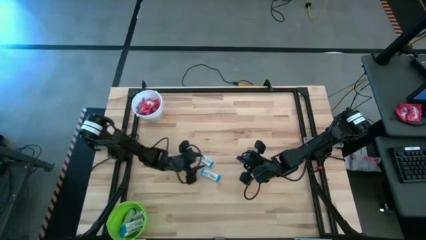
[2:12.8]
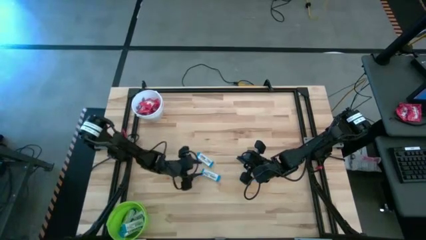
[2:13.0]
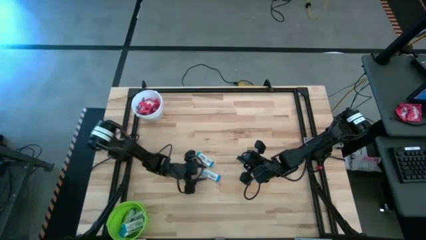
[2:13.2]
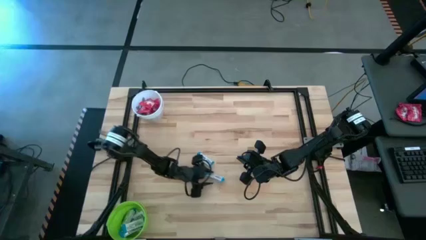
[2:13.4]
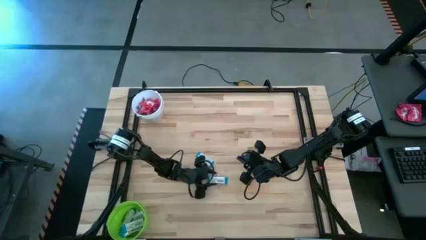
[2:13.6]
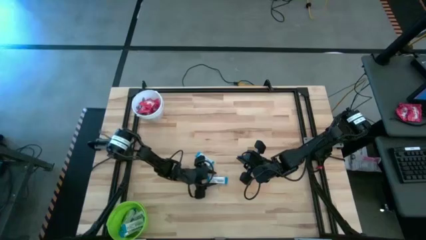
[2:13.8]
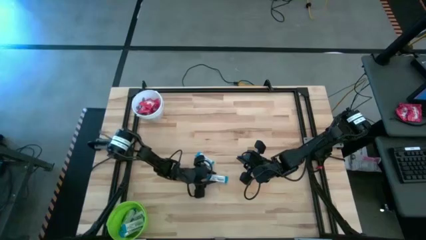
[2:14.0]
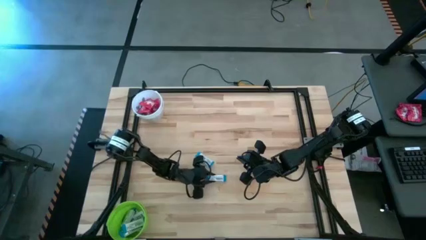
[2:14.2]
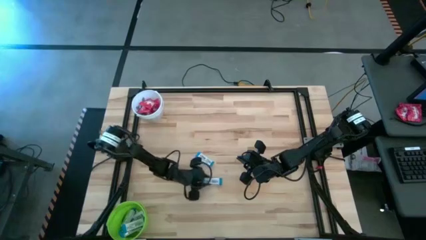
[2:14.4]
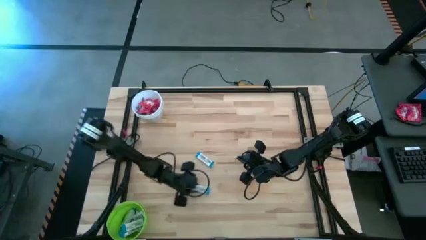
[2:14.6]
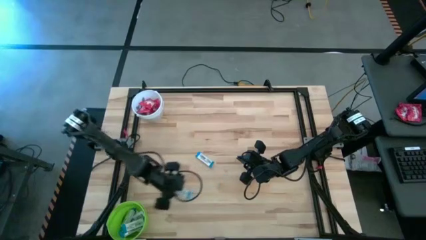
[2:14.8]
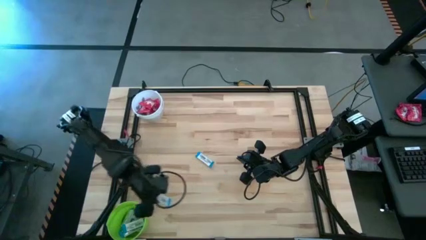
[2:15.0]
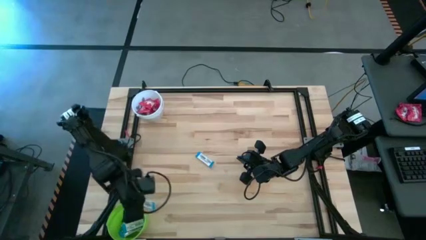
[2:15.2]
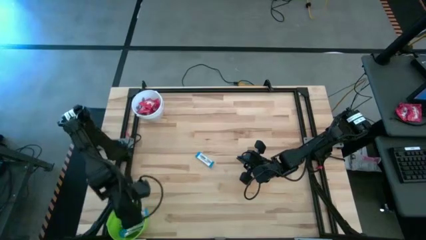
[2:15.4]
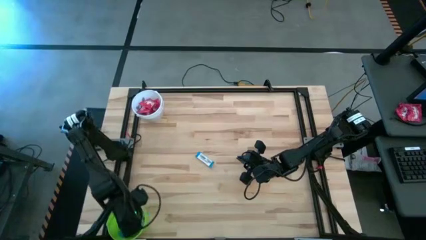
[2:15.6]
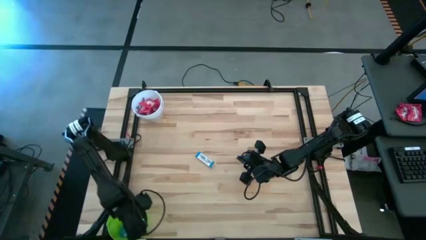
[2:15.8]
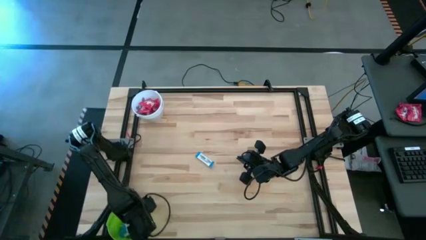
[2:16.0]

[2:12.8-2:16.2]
Task: Sort candy by brand, put in halloween buckets
Put the bottom blue chocolate bar into the green bucket

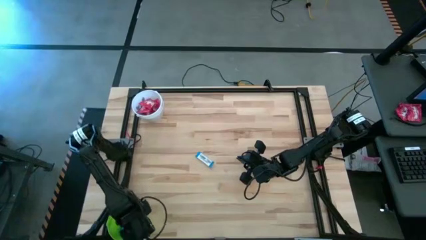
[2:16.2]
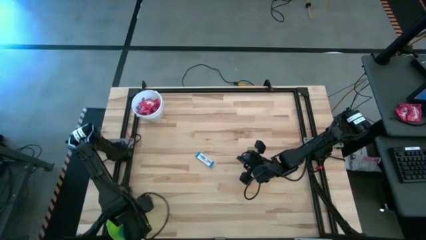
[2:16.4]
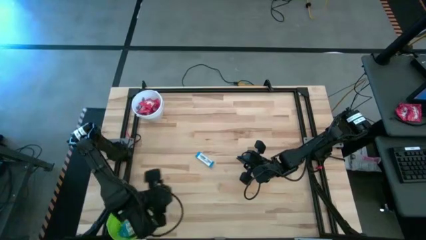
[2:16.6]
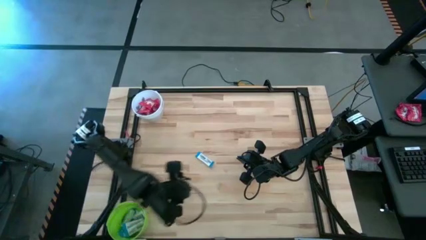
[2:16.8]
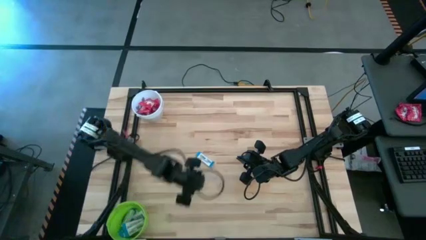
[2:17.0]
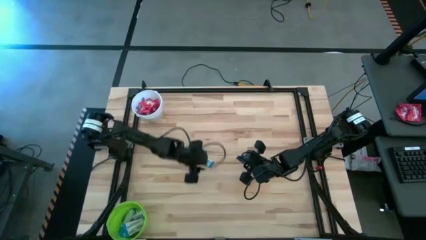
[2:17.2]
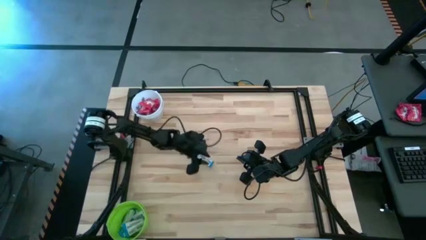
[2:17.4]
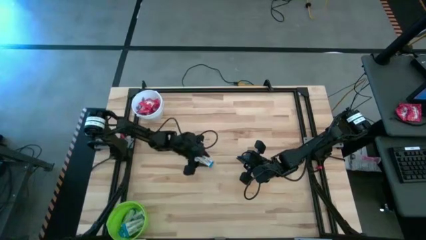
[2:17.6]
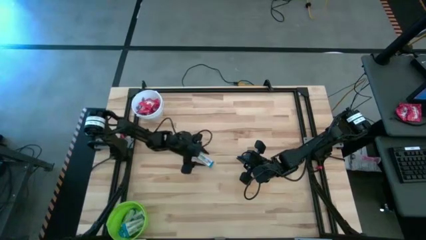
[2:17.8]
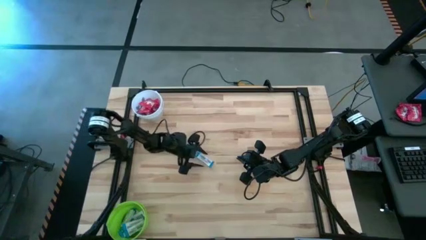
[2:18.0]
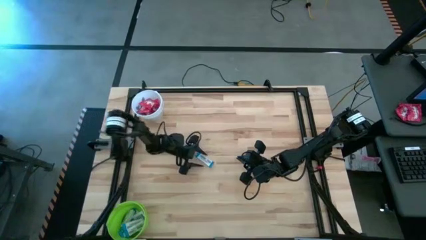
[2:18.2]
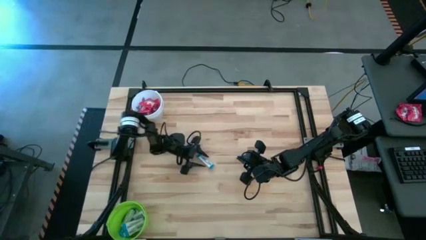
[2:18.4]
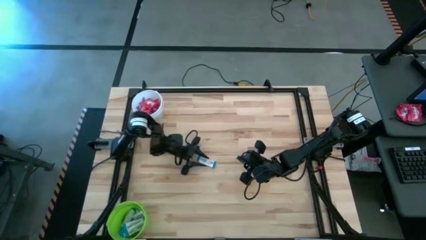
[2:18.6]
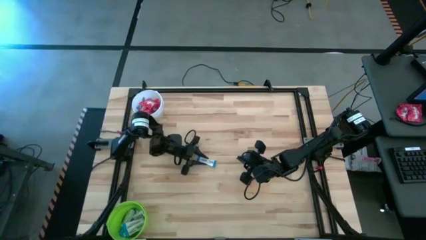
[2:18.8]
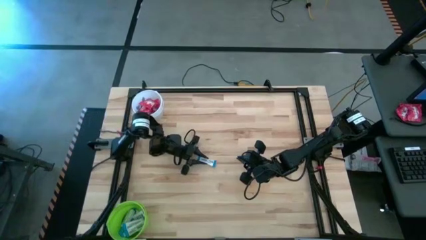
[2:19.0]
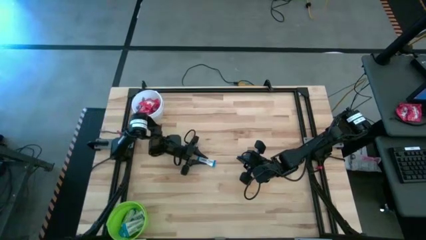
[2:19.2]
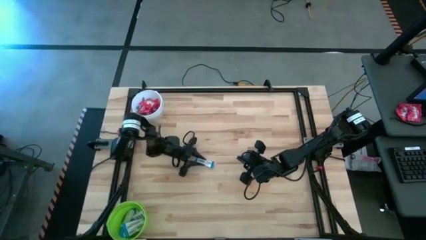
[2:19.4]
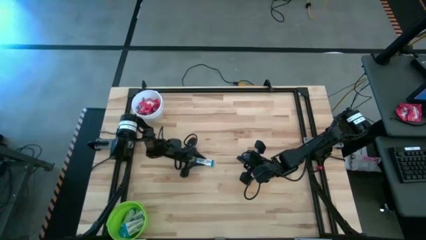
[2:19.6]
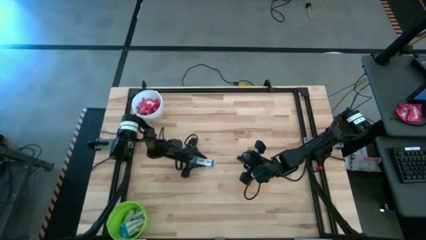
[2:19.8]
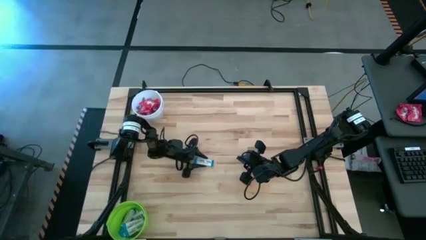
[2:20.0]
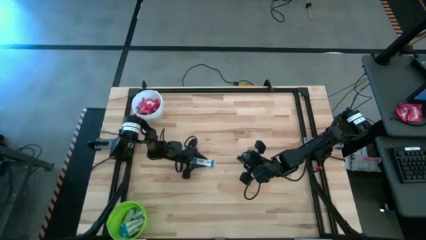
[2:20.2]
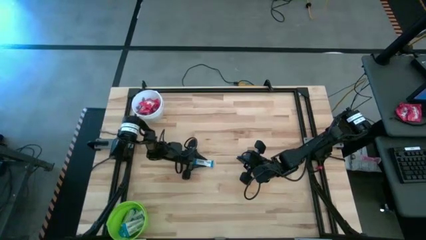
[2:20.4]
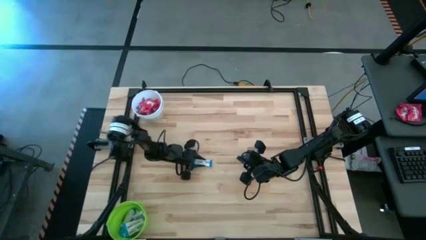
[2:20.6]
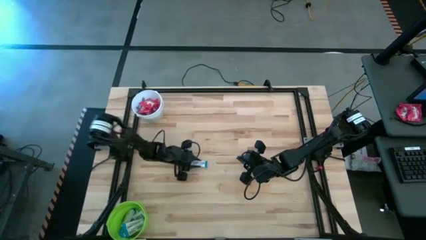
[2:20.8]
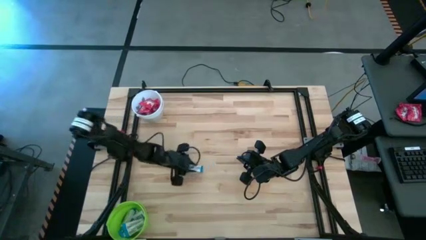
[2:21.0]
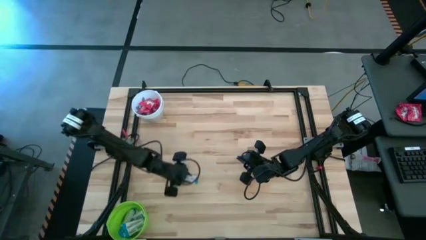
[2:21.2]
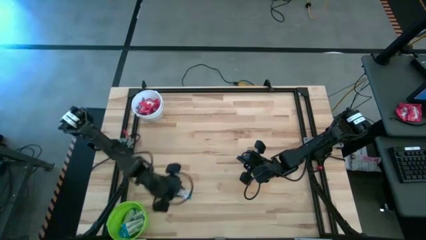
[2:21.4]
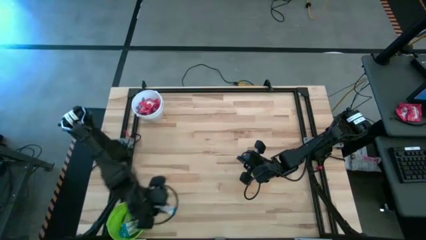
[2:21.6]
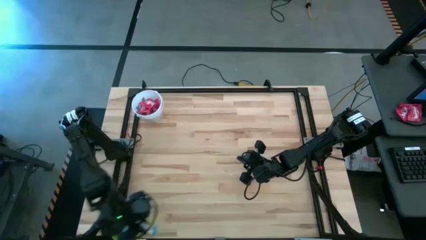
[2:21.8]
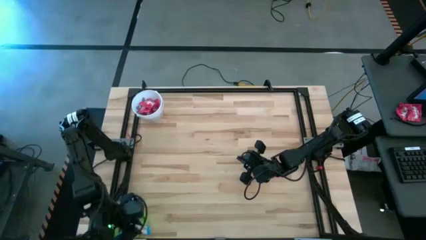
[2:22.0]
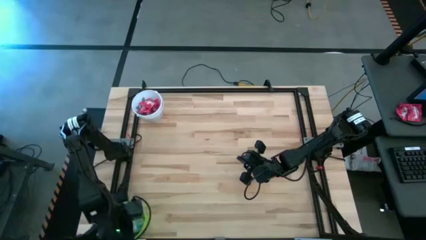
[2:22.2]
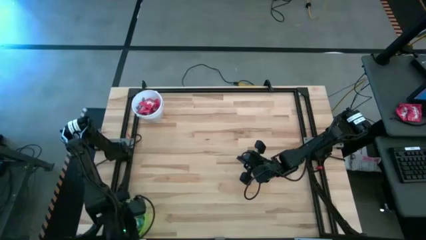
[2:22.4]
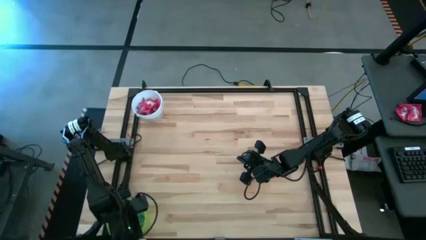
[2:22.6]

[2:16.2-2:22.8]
Put the blue chocolate bar into the green bucket
